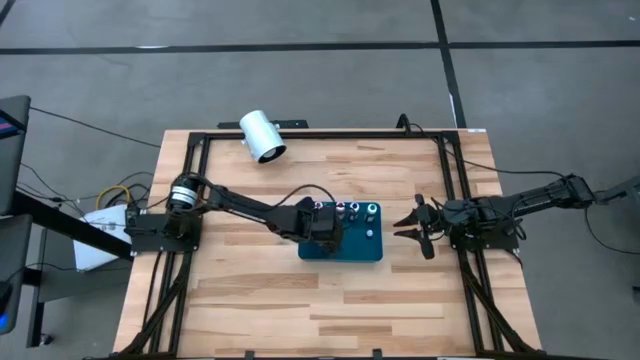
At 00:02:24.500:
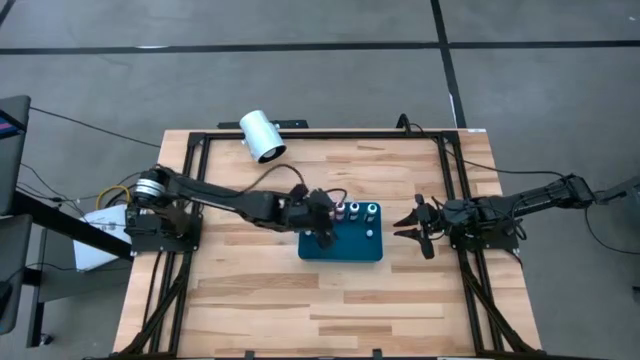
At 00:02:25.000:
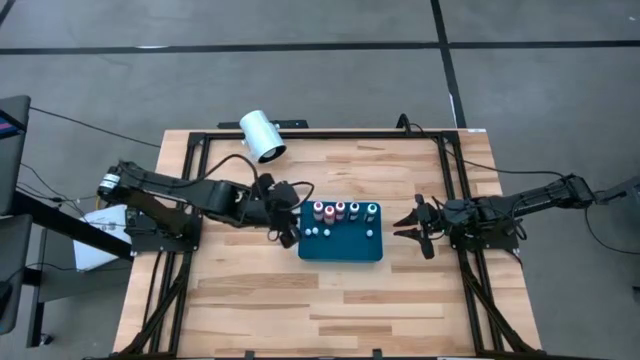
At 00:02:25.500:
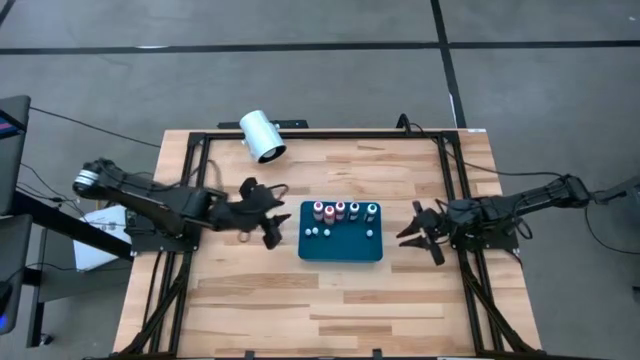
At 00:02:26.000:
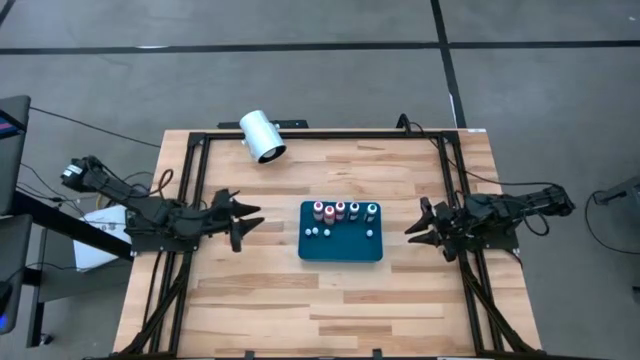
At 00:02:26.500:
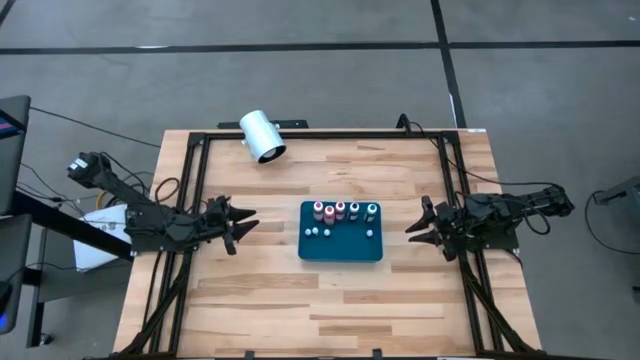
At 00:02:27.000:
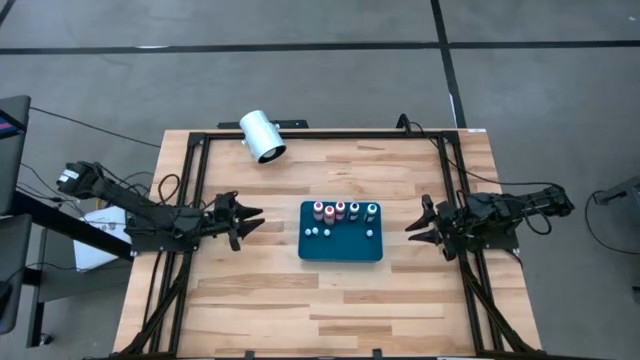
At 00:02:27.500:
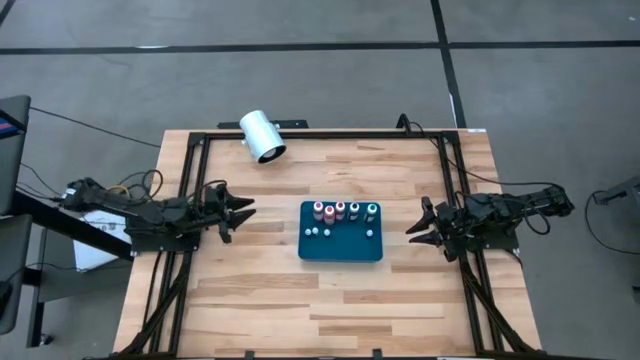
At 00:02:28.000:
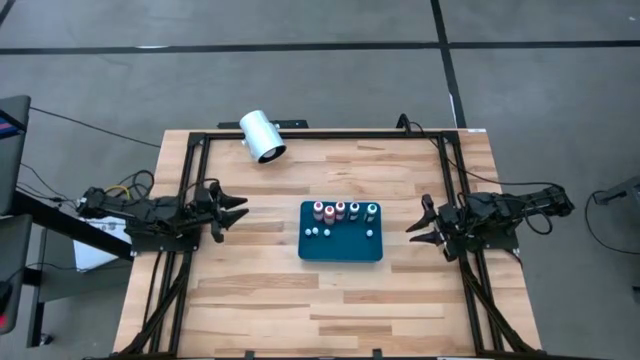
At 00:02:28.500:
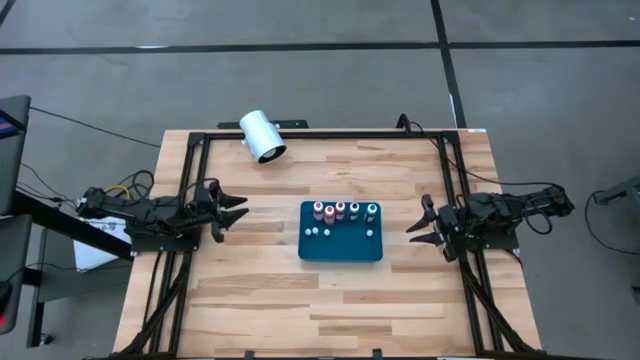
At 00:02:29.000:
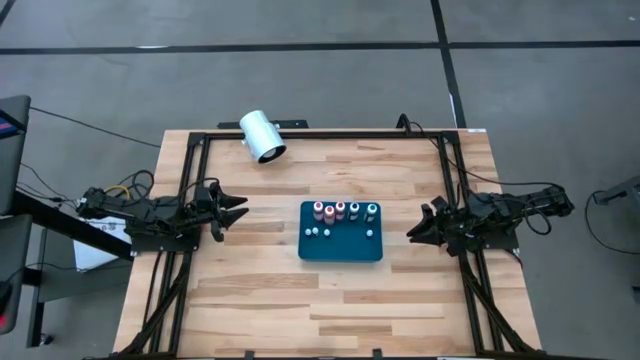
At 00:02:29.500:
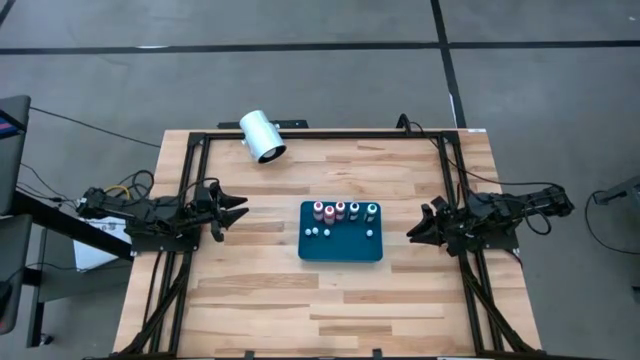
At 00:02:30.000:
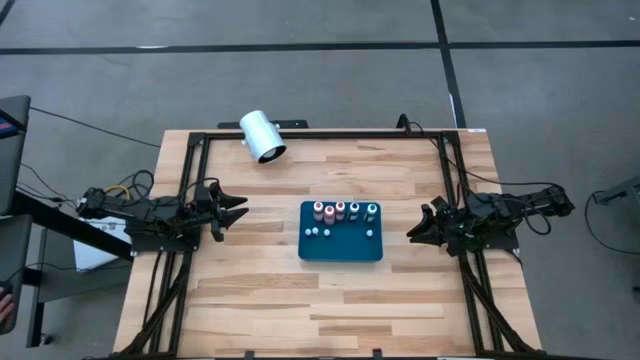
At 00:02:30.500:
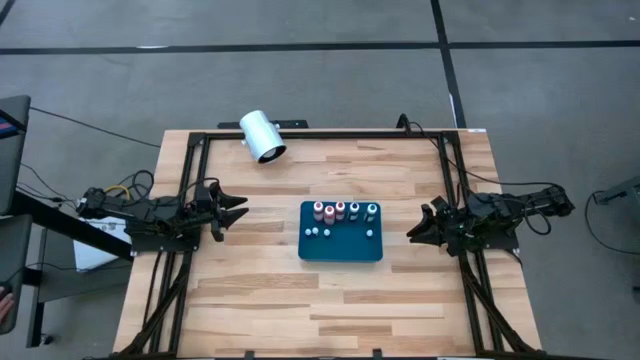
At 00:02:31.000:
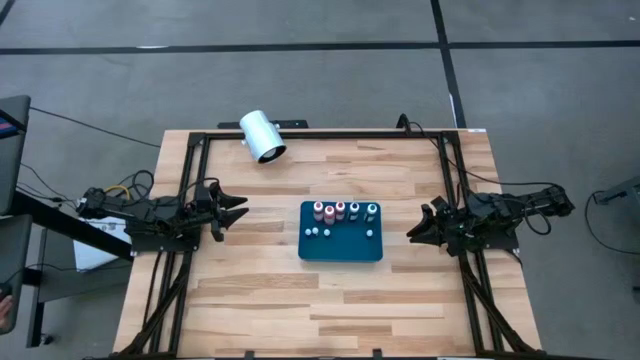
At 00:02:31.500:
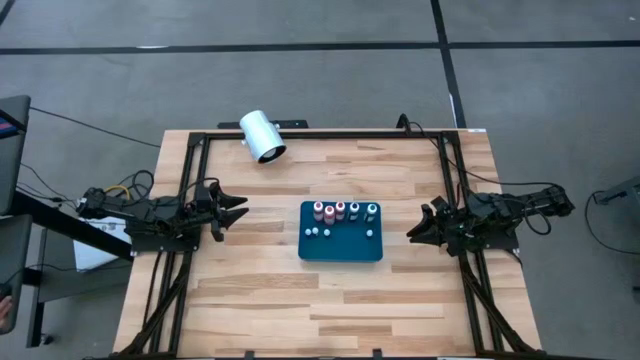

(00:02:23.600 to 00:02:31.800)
Task: Pick & Place food coloring
Return to Home Position

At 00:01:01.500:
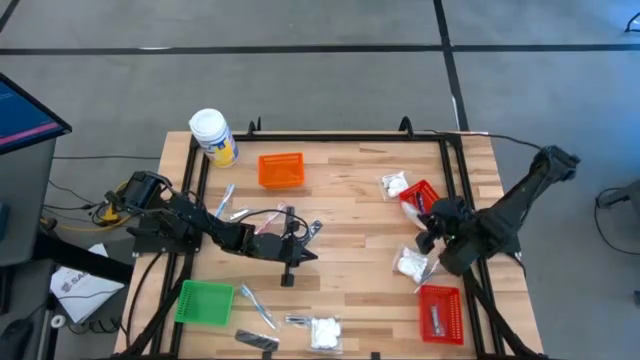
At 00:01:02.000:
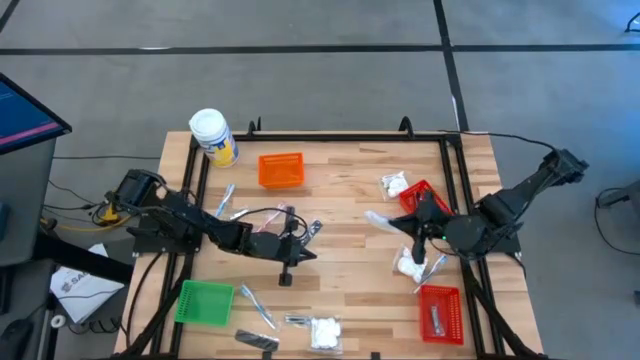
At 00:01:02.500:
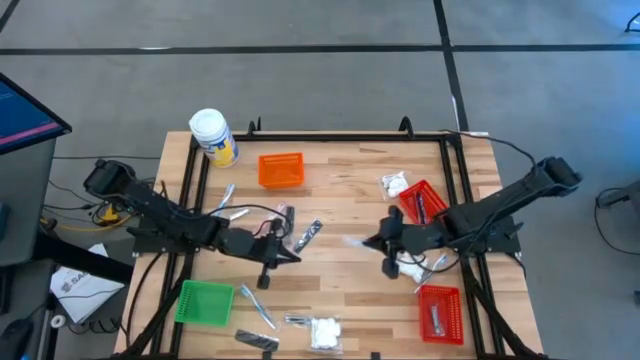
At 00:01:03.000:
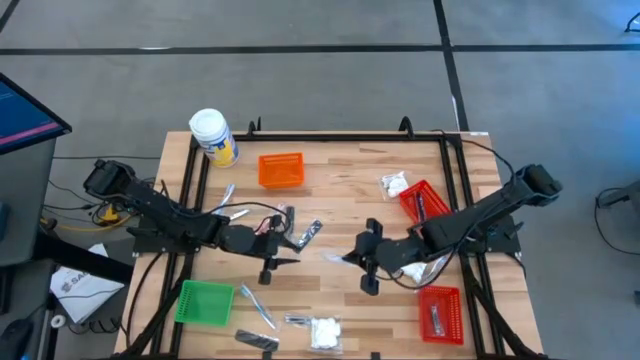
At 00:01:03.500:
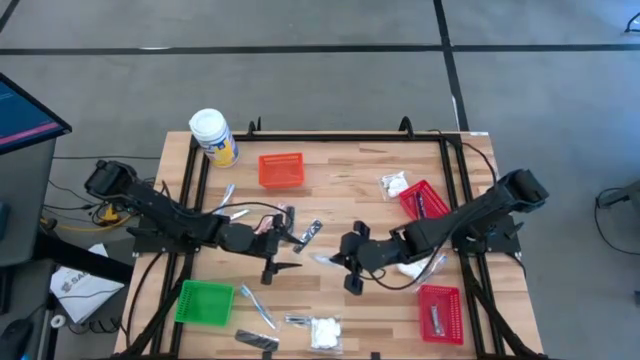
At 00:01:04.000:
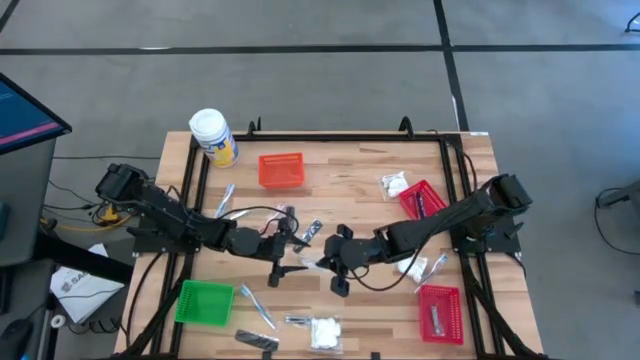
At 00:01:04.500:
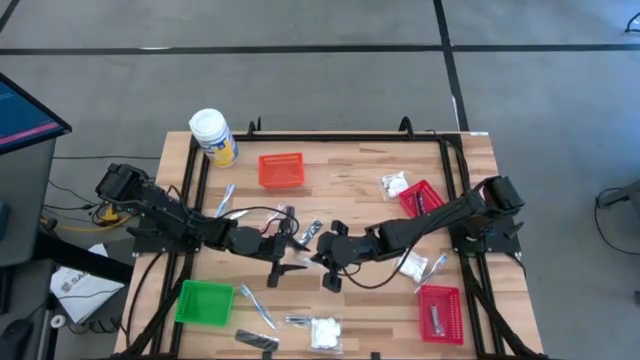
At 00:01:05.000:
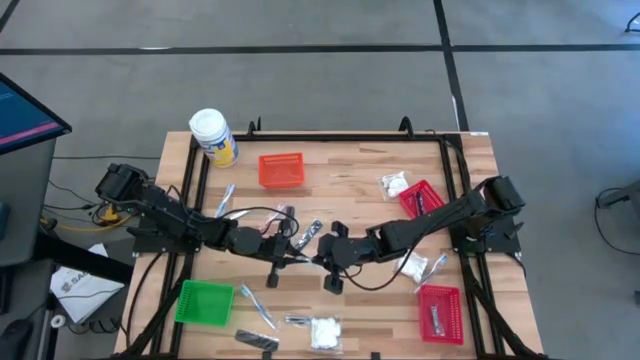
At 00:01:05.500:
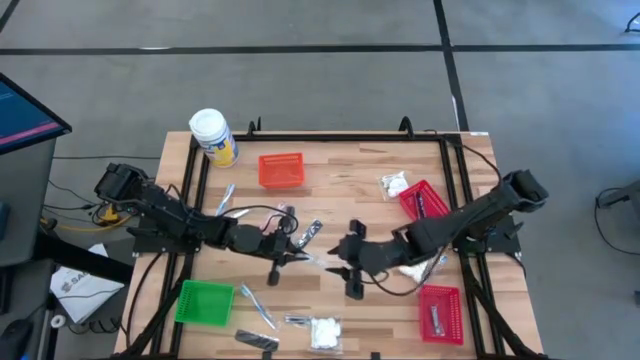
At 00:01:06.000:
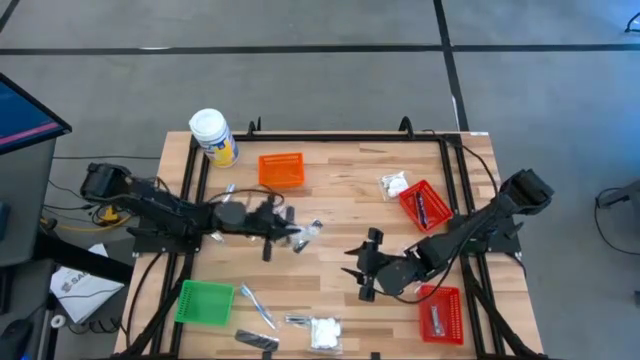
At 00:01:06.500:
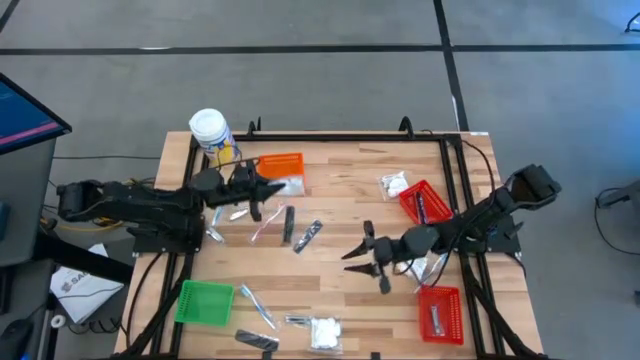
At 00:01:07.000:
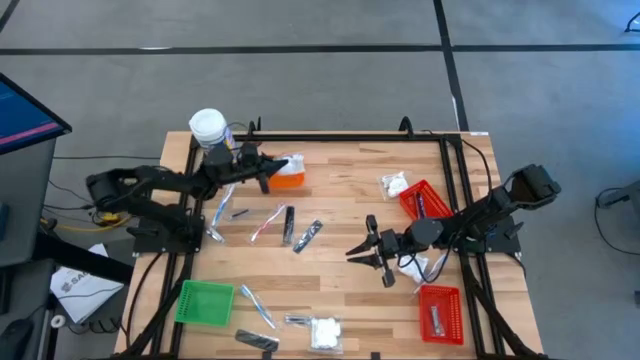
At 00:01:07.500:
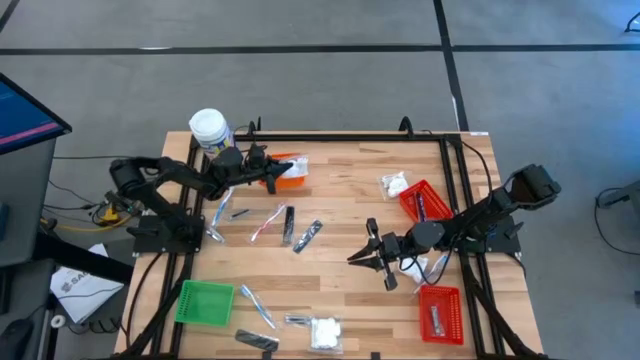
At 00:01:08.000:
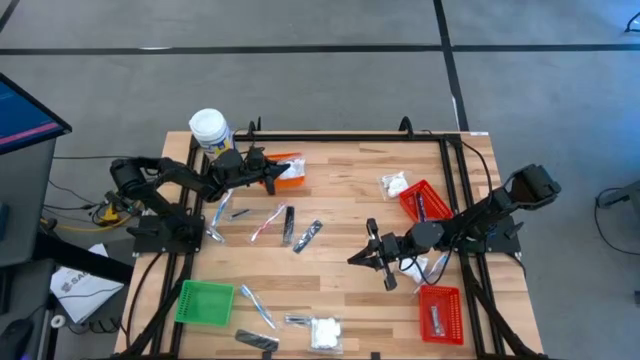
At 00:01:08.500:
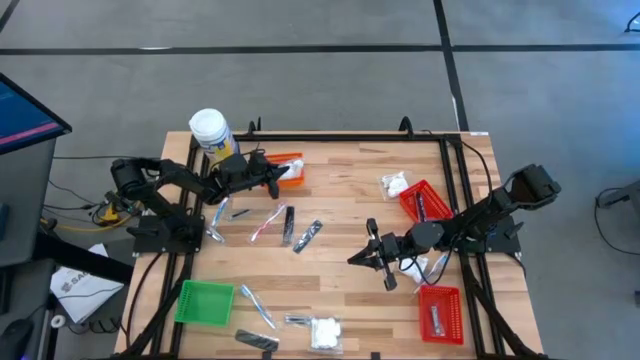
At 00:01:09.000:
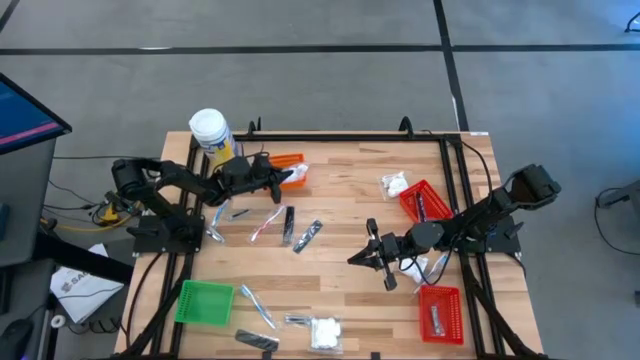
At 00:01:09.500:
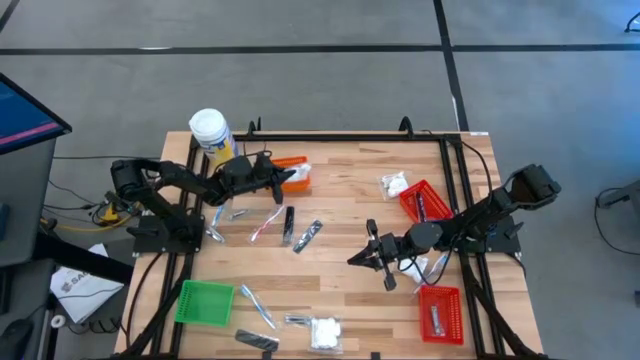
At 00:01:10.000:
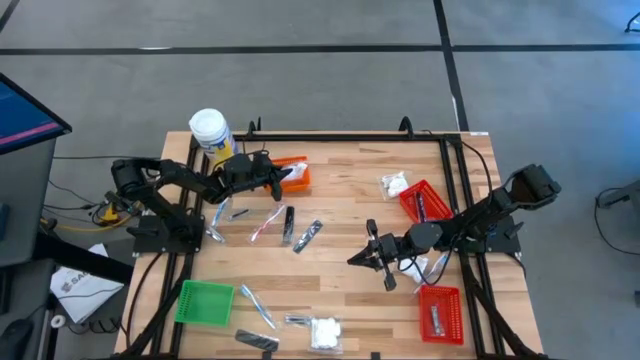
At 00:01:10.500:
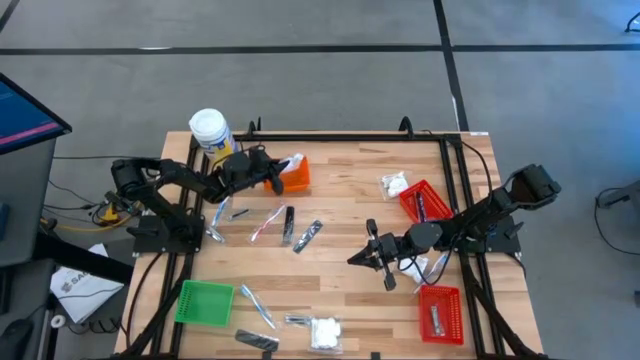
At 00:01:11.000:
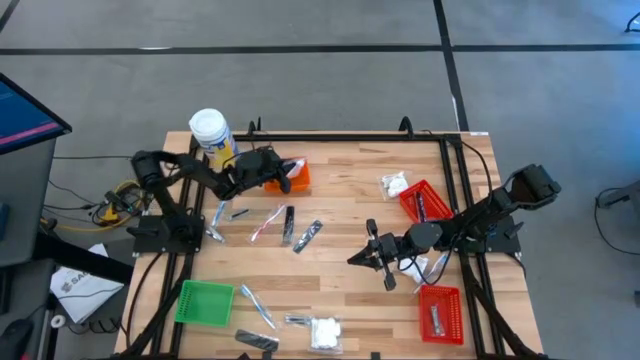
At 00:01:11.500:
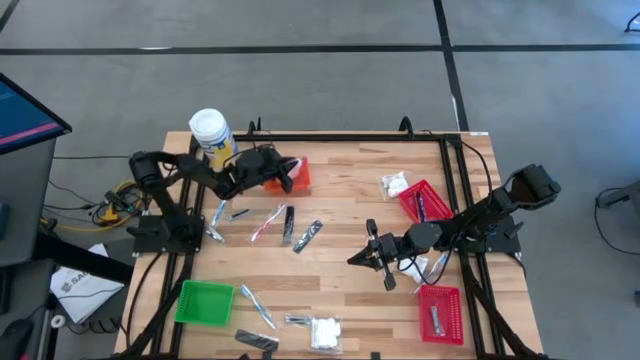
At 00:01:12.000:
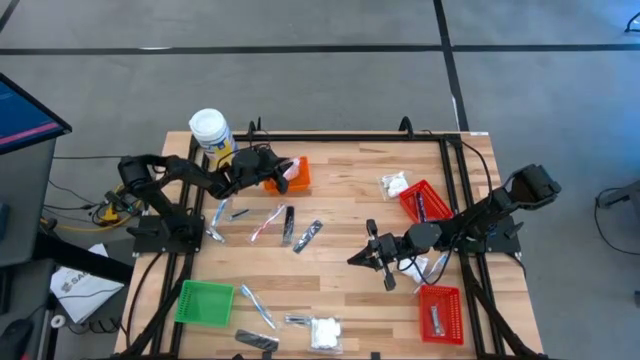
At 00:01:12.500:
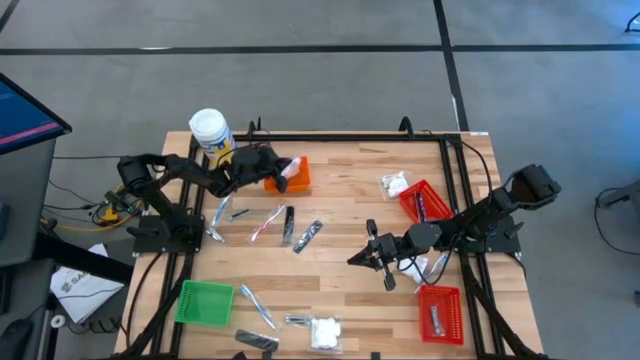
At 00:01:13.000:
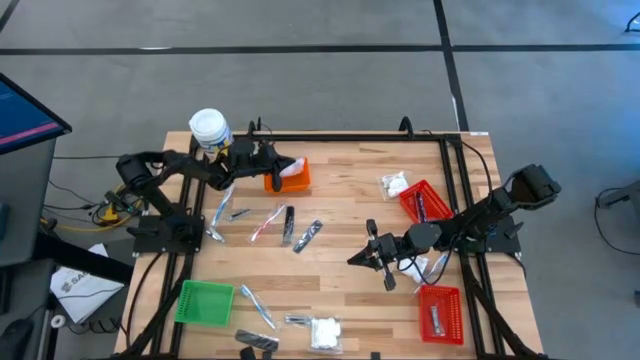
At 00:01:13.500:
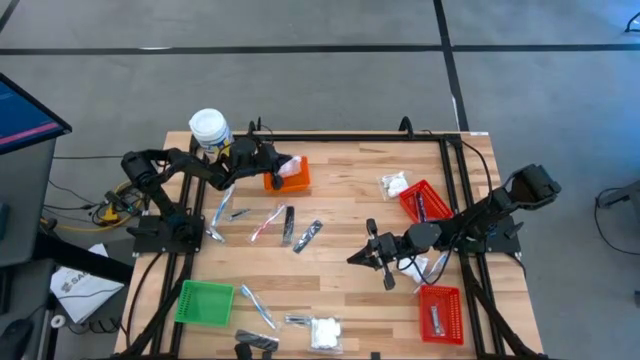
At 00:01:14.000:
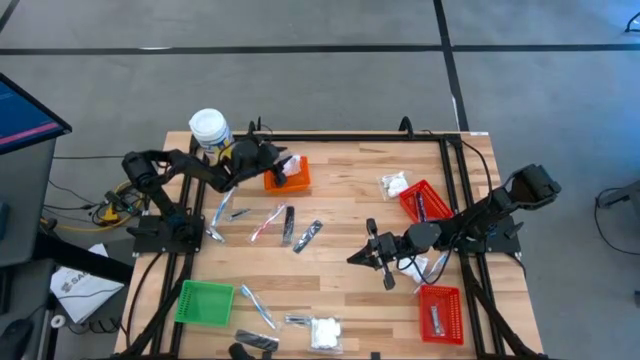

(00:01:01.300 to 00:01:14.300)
Task: Pick & Place Travel size toiletries
Put the white cotton pack into the orange basket
